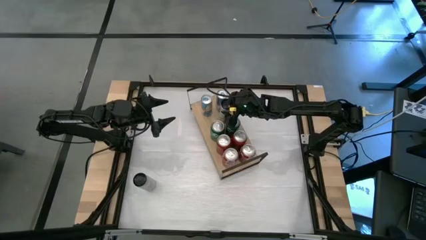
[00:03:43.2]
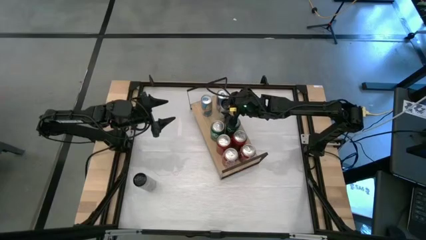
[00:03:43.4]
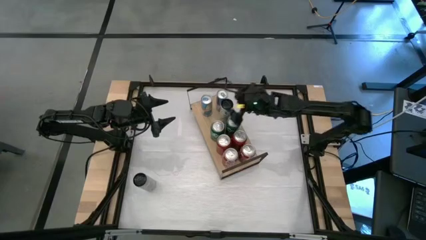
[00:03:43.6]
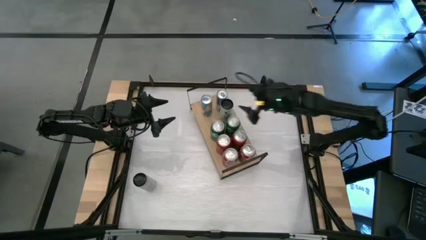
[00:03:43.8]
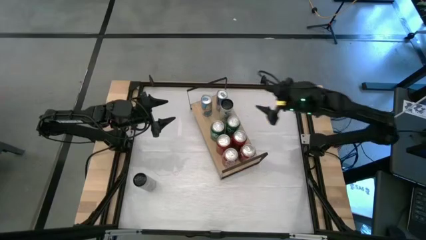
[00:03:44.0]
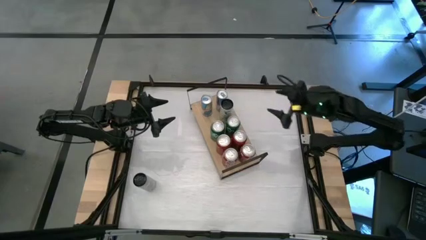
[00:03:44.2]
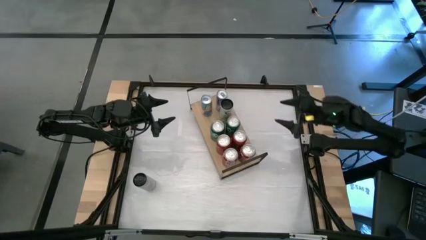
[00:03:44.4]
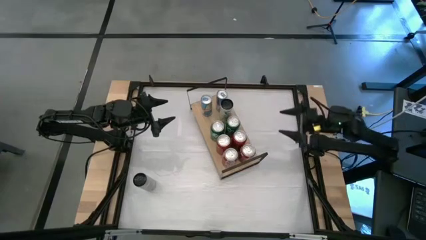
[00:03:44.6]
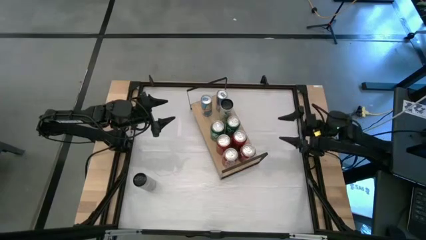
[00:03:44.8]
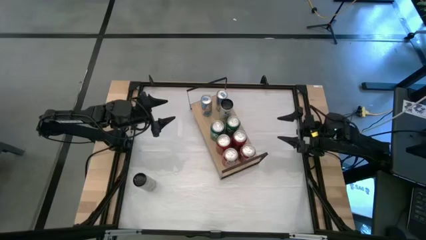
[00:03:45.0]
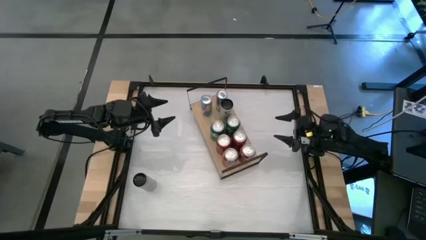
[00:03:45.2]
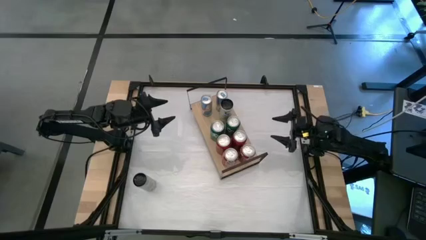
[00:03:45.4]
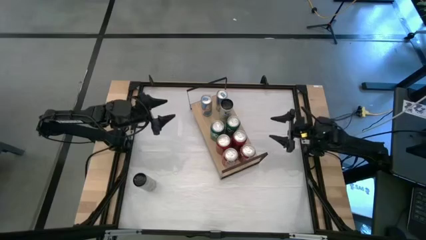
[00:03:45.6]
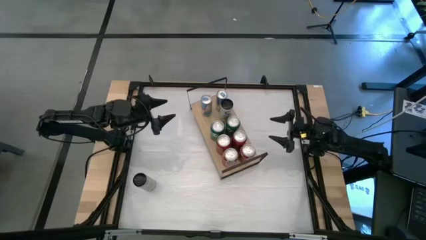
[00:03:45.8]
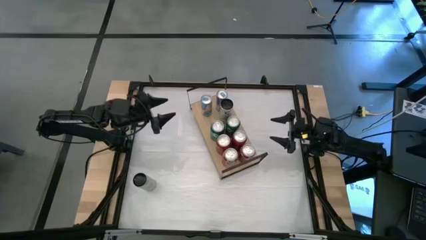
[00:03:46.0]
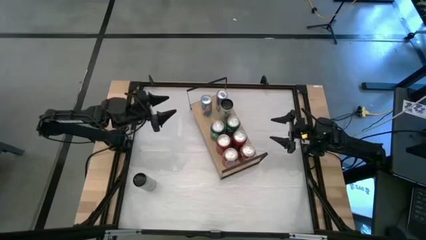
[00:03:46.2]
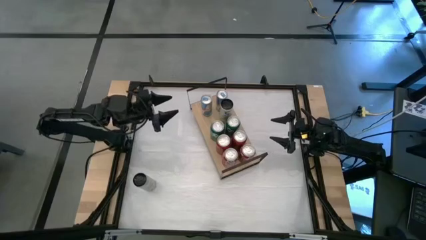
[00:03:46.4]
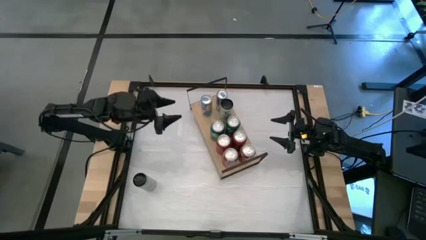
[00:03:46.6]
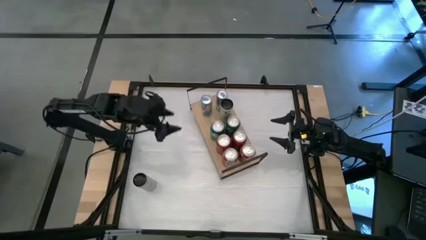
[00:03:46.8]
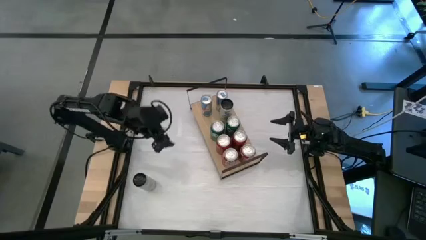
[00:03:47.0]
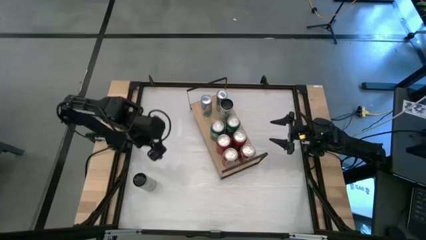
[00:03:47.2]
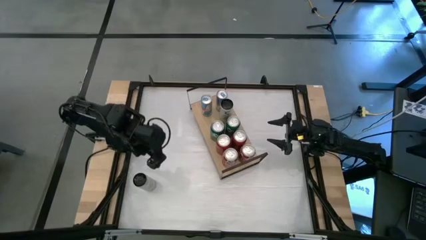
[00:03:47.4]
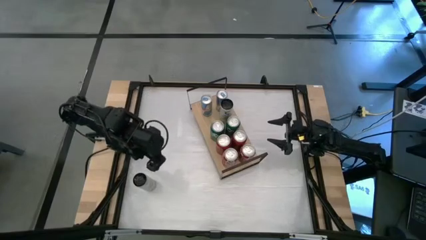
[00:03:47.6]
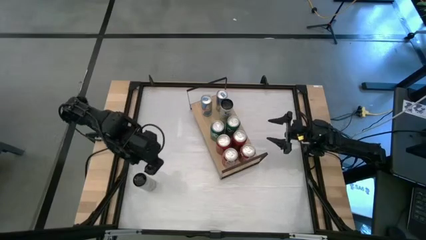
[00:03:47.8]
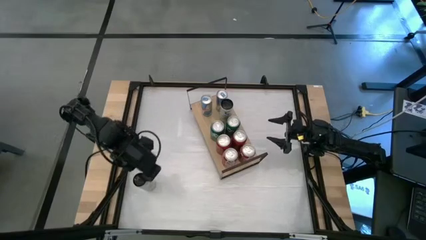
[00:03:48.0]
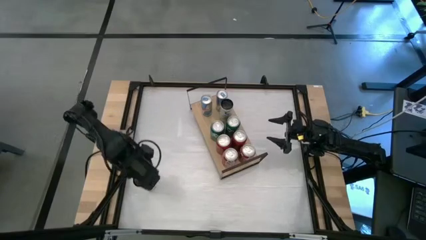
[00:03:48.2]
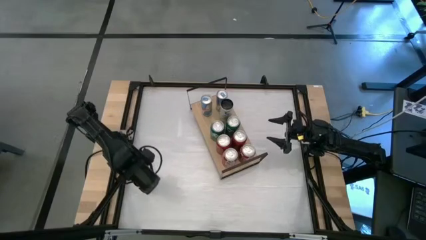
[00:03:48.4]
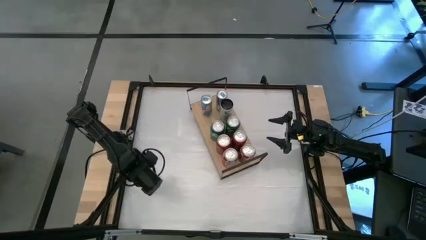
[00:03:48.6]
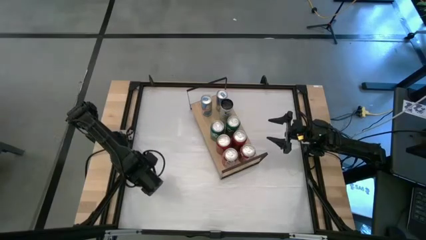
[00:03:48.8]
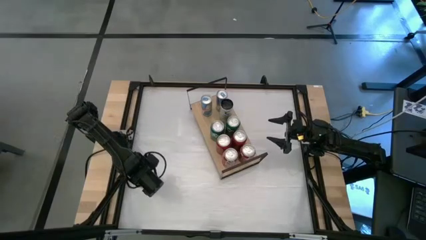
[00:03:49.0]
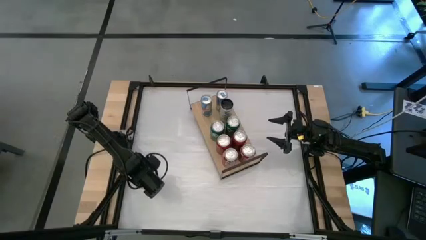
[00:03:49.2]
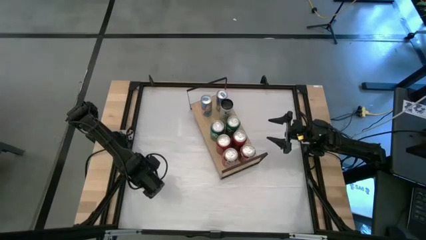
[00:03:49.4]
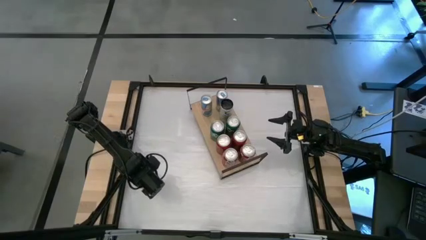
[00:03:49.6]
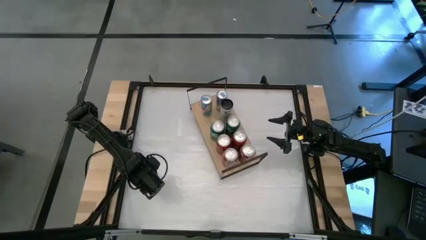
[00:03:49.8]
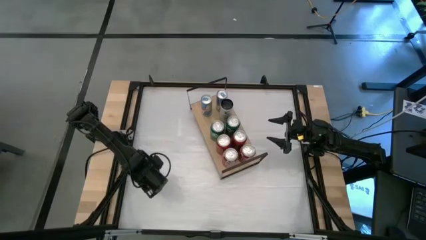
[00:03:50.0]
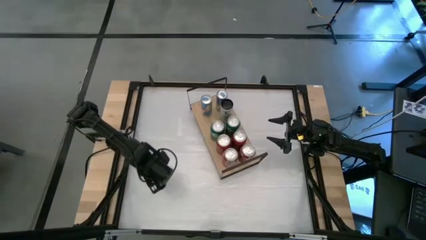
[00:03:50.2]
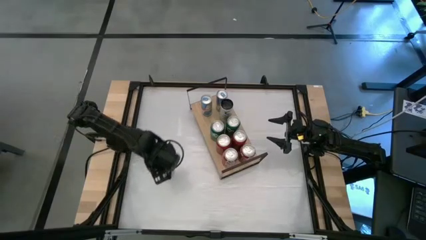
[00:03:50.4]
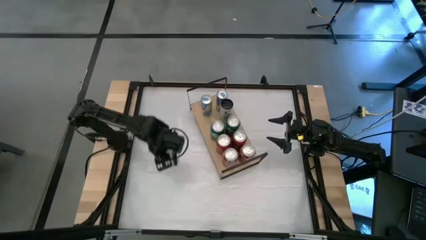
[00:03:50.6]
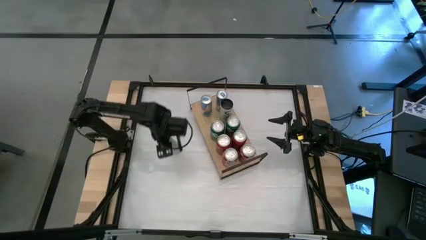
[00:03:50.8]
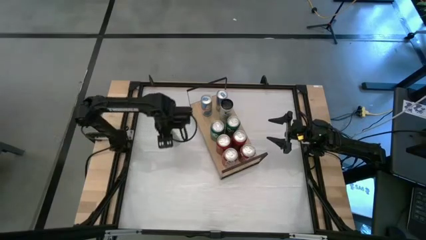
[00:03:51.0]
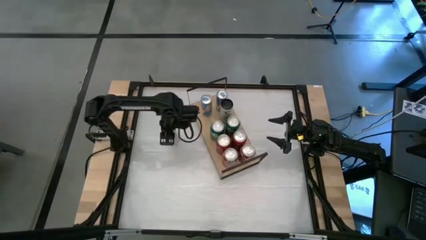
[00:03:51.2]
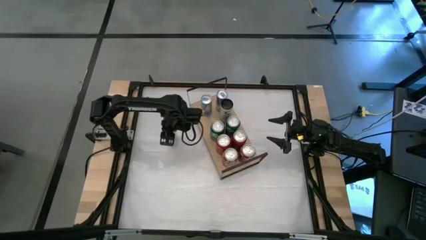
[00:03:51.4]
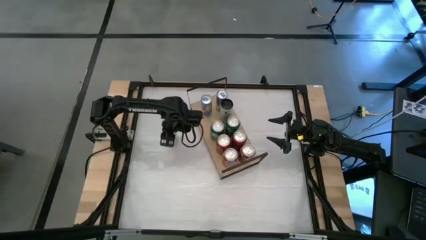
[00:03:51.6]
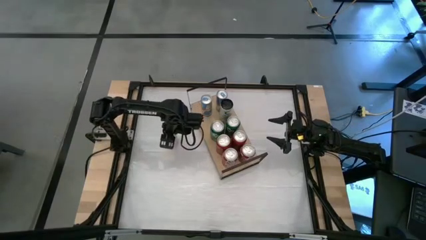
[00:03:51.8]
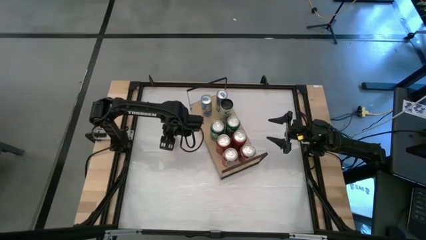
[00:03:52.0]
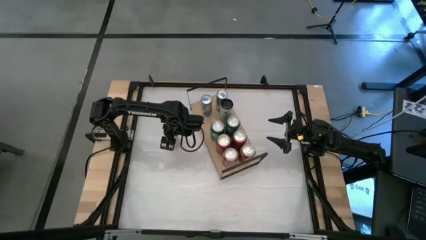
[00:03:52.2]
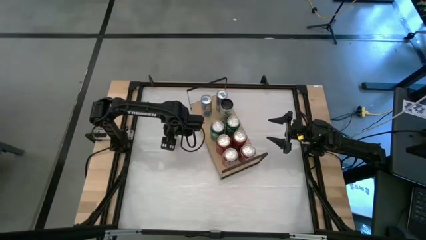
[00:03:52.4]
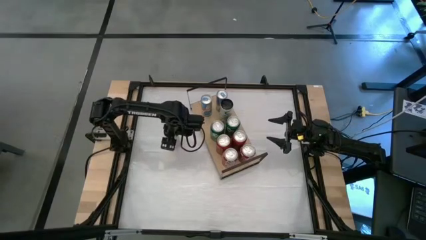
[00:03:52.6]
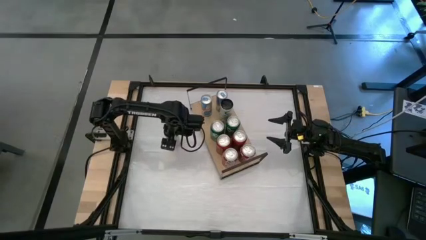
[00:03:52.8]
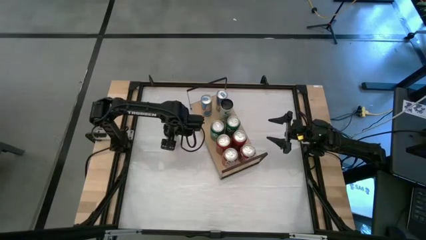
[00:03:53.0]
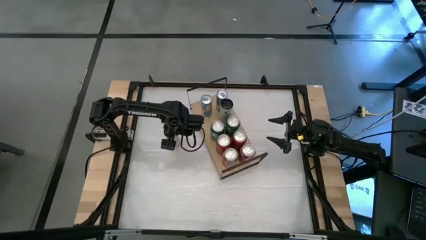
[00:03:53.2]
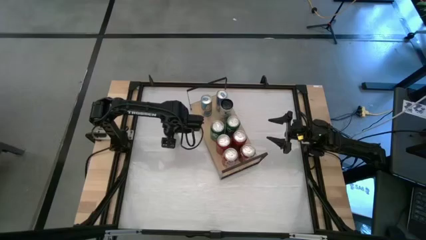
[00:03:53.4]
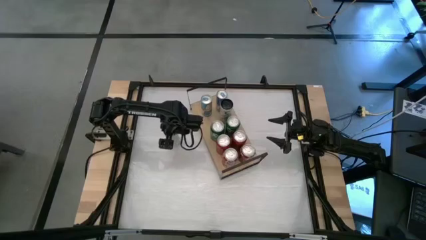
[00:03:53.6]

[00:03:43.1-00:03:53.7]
Task: Place canned beverage on shelf
Put the white-yellow soda can on the shelf aligned with the other white-yellow soda can

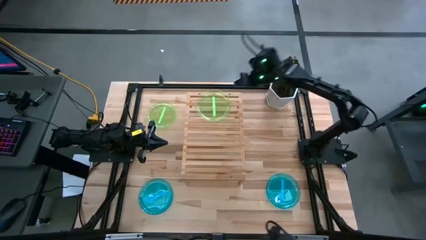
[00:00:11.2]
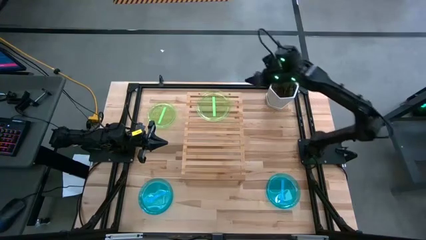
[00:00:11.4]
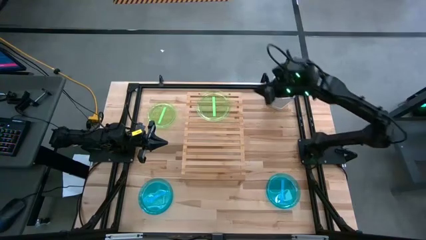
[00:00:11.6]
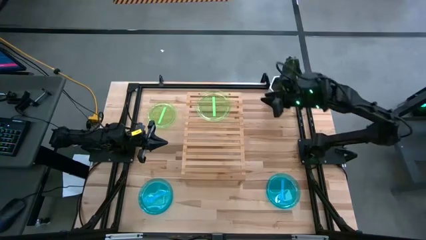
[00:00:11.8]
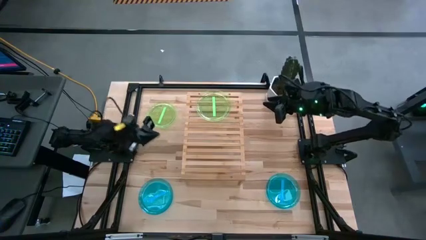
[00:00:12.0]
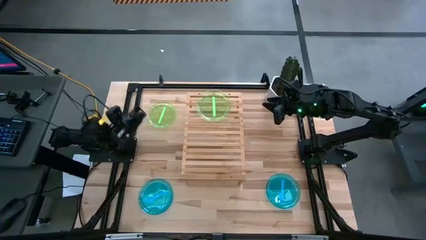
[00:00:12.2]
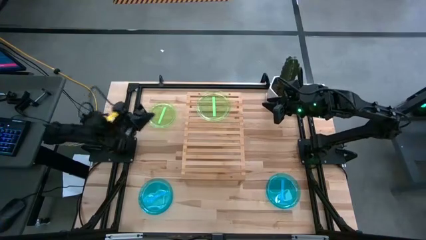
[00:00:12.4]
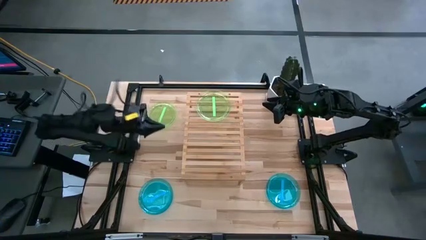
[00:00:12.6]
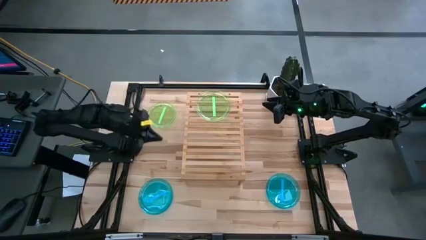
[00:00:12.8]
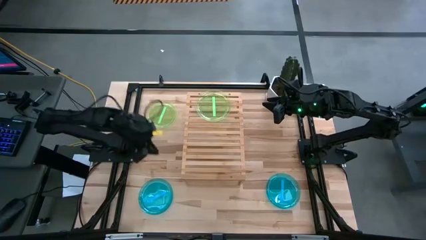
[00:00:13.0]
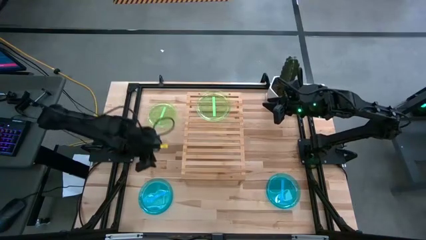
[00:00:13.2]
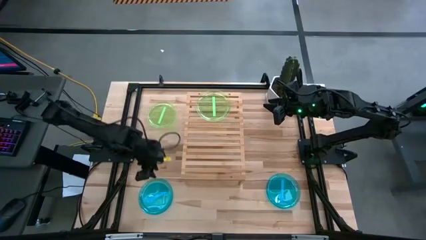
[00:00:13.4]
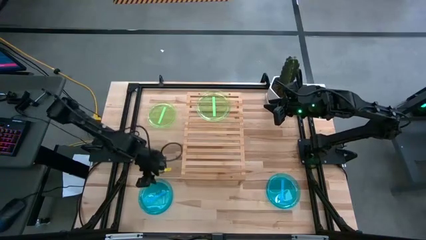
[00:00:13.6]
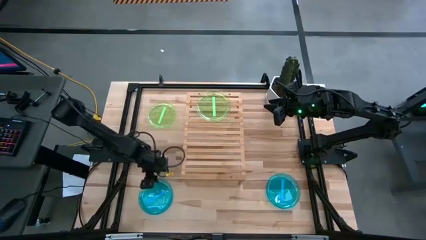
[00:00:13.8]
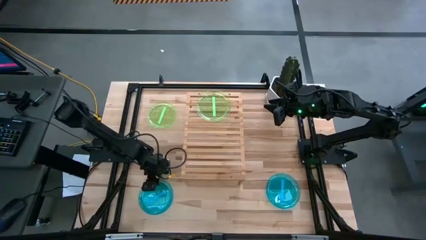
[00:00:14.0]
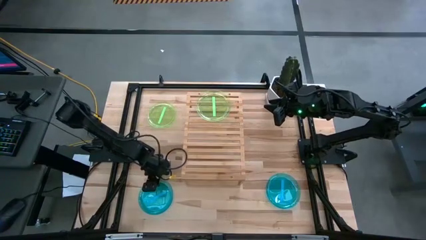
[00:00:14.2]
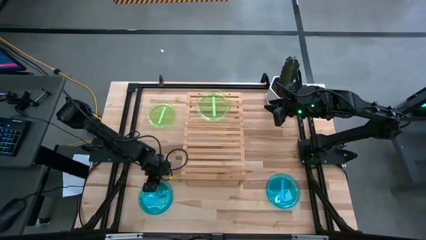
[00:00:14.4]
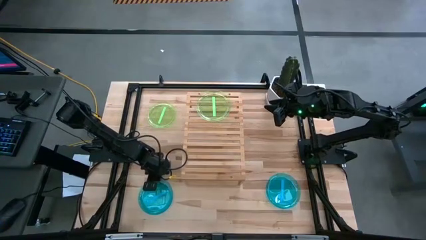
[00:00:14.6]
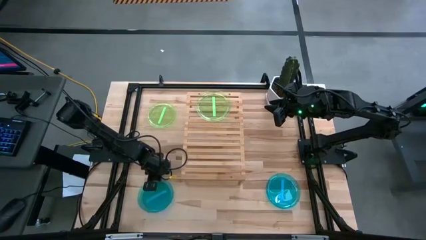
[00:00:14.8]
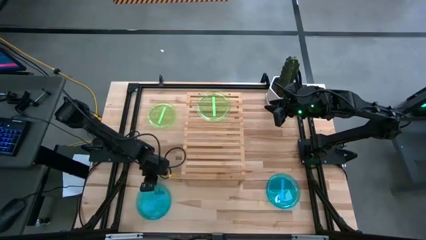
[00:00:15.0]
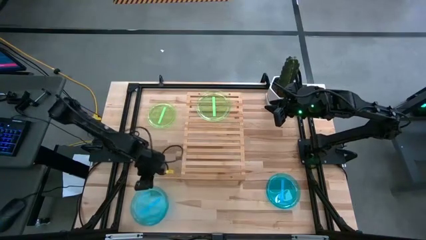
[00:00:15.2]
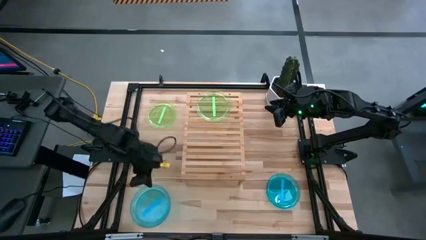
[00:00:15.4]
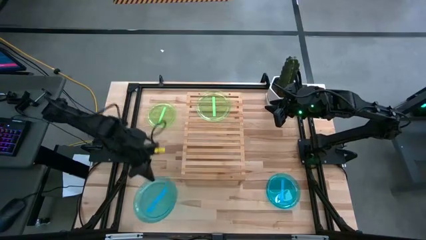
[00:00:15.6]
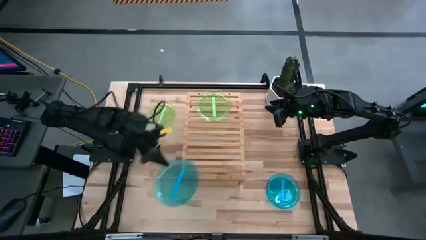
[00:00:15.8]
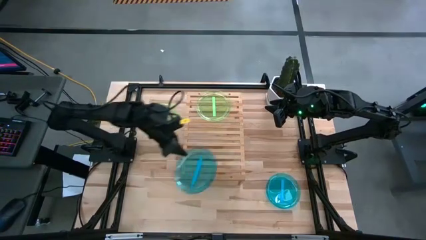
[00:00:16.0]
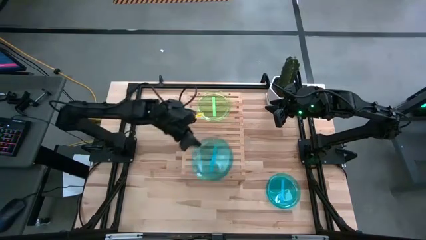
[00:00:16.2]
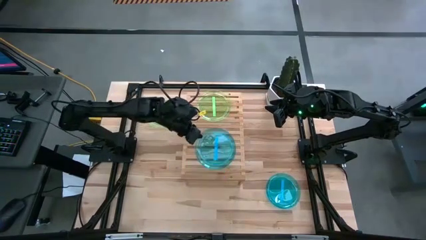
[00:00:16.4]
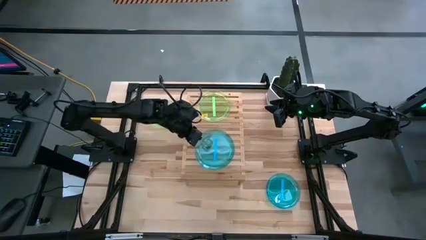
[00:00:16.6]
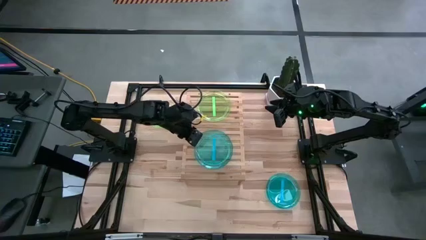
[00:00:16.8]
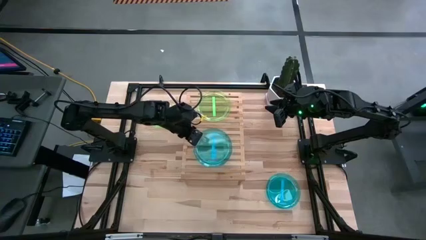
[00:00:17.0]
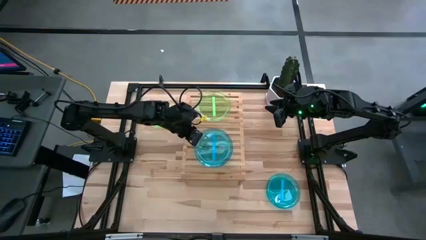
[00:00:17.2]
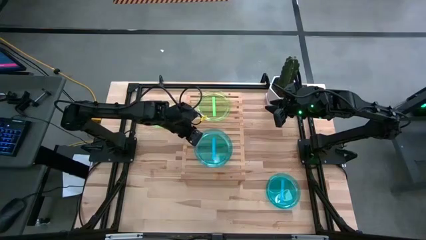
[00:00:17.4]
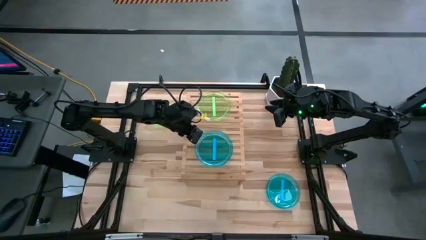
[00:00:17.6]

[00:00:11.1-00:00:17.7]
Task: Place and stack plates onto a shelf
Put the left blue plate on the shelf
